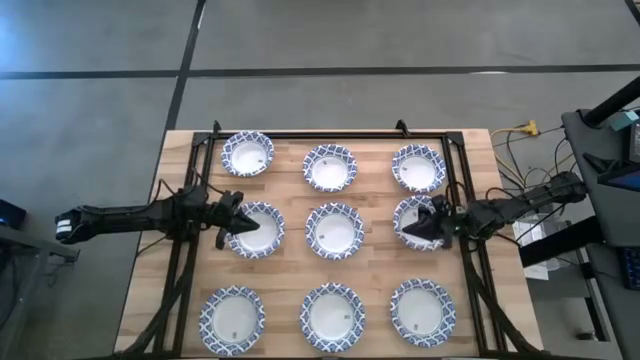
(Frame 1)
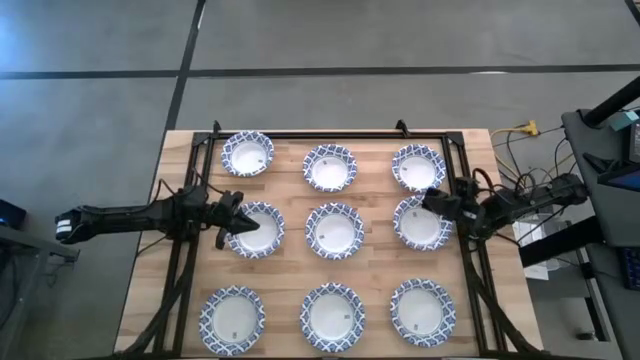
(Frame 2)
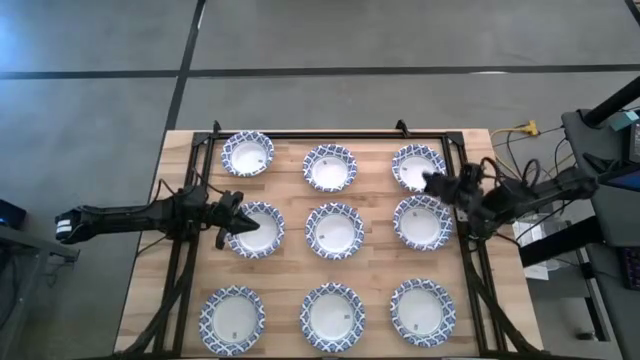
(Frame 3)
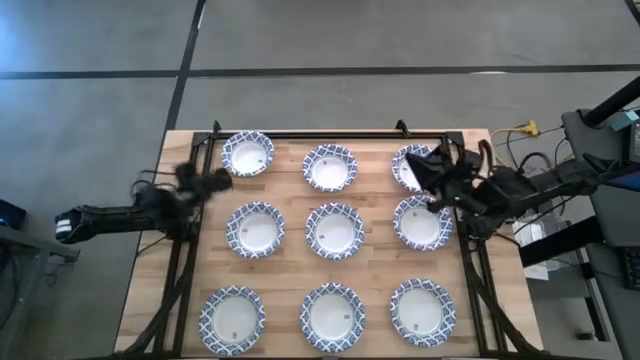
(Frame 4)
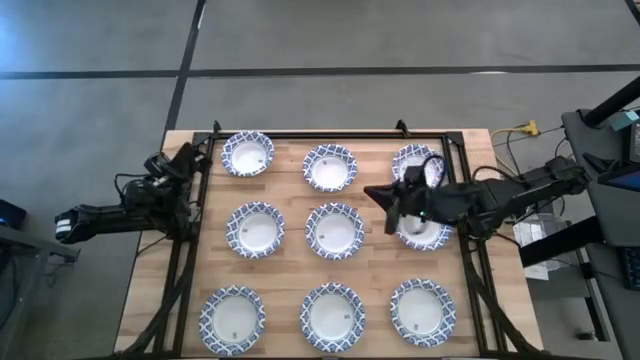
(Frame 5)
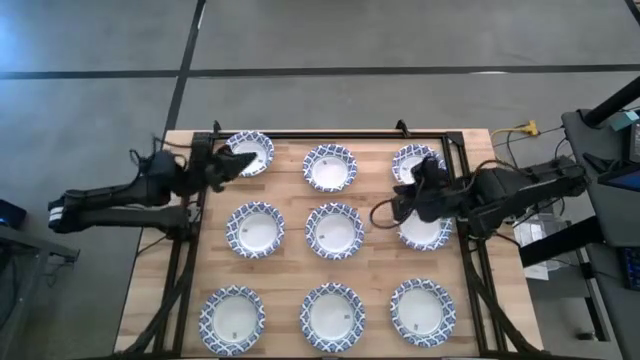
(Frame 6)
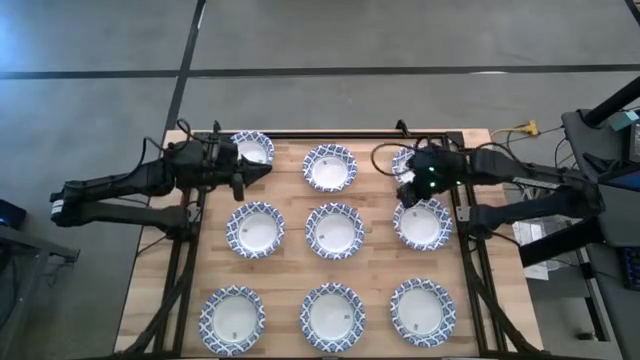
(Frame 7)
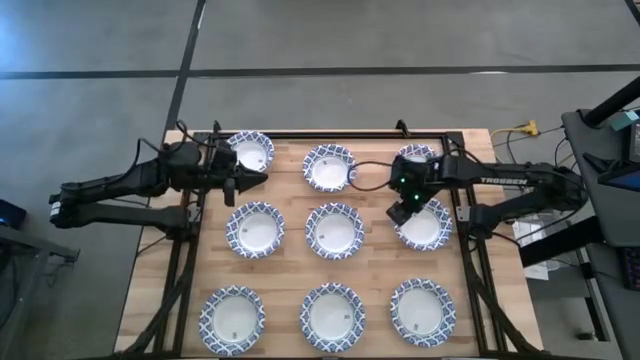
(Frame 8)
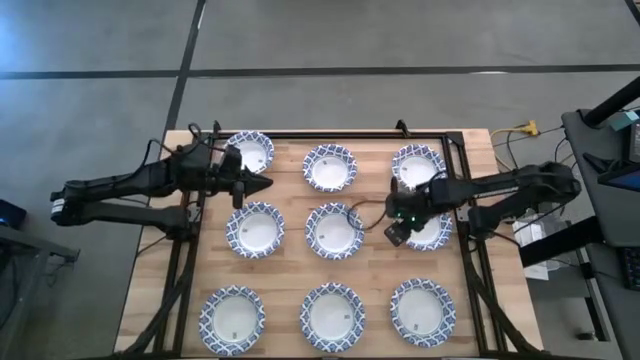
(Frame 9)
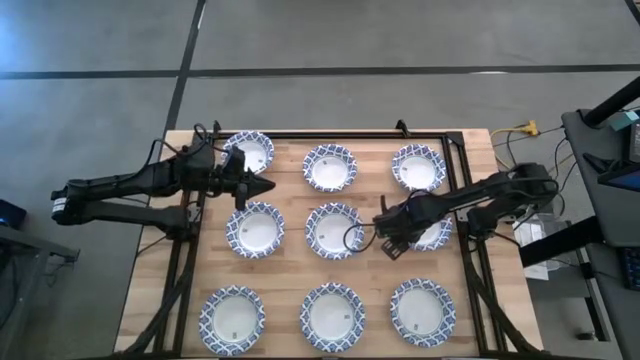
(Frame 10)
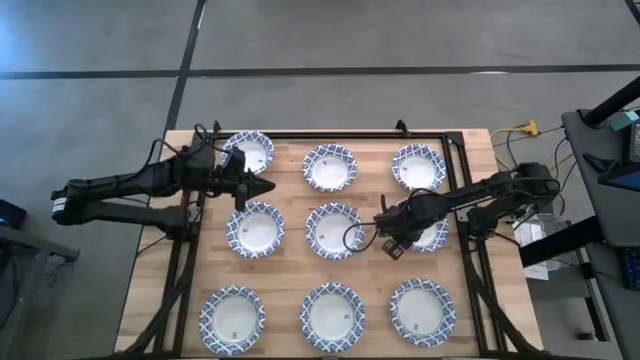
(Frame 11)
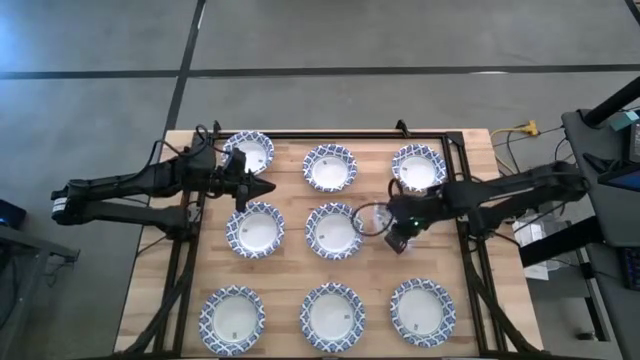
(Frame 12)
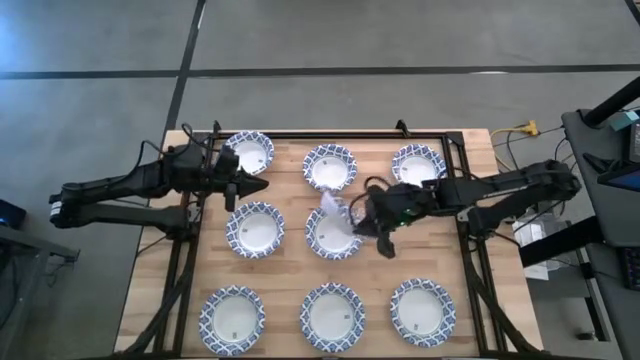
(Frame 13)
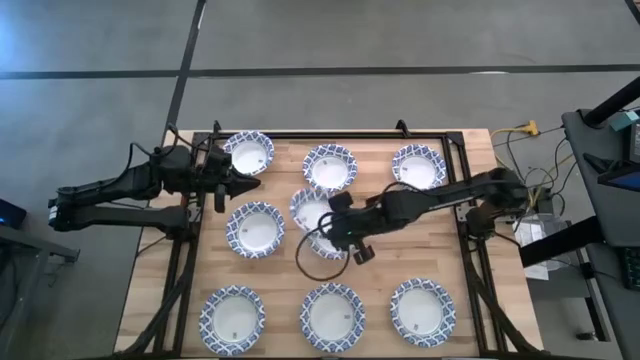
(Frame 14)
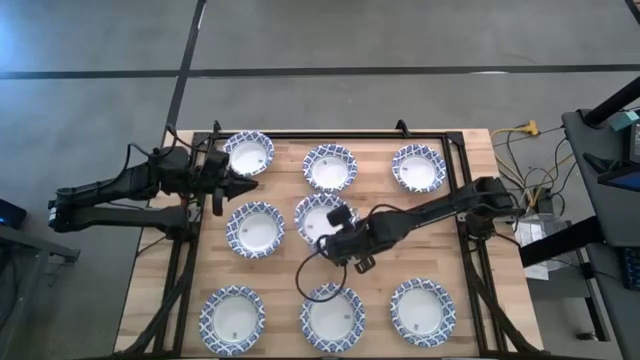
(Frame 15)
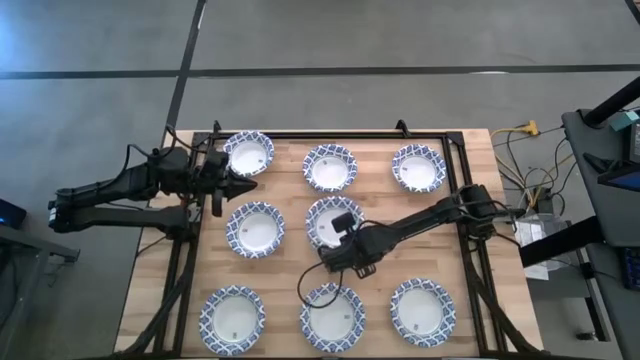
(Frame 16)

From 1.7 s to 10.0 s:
Task: Nest bowls inside each other
Stack the blue paper bowl into the blue paper bowl

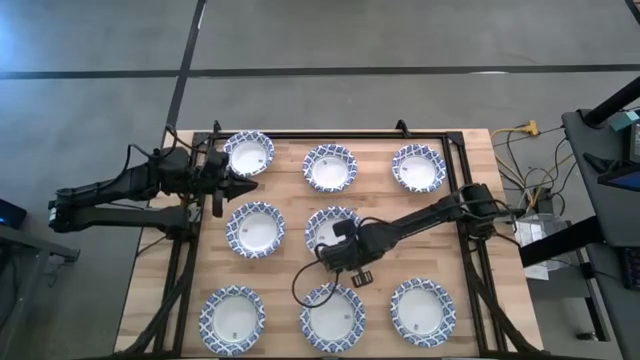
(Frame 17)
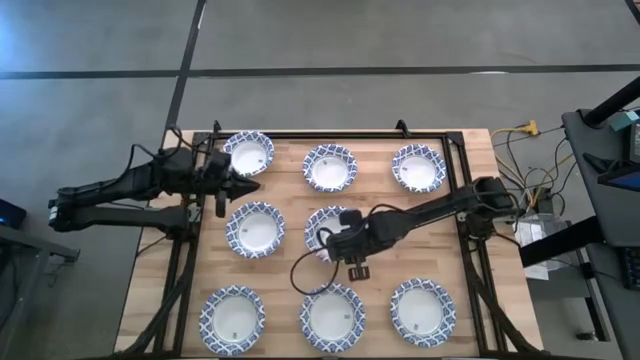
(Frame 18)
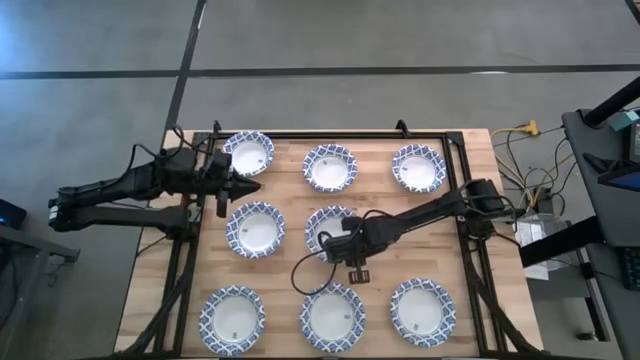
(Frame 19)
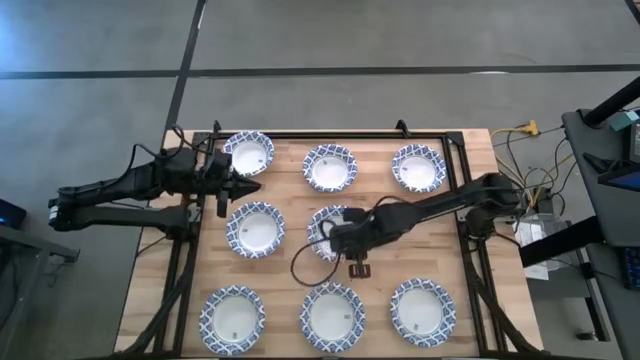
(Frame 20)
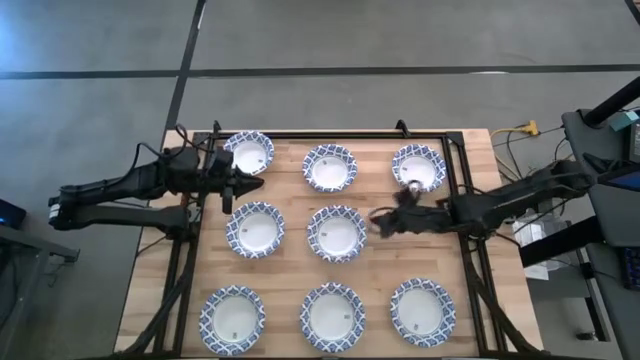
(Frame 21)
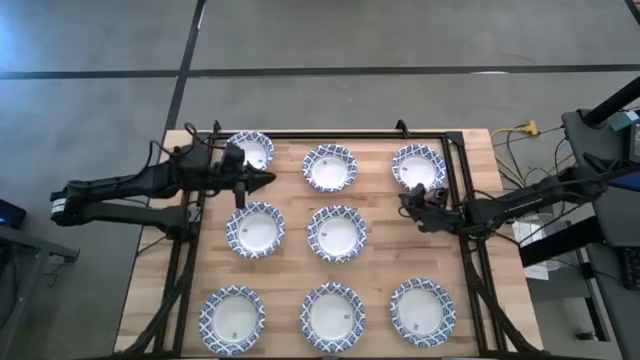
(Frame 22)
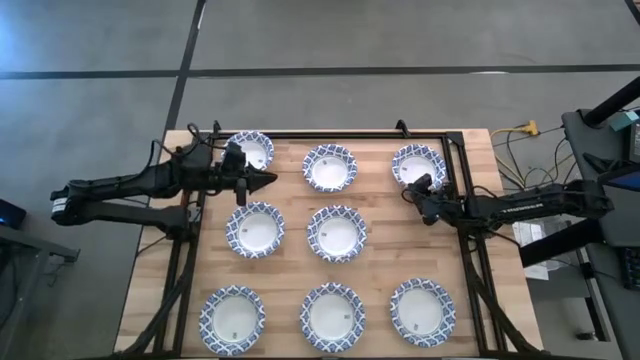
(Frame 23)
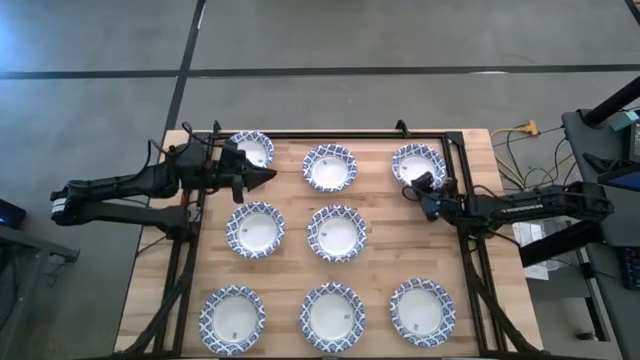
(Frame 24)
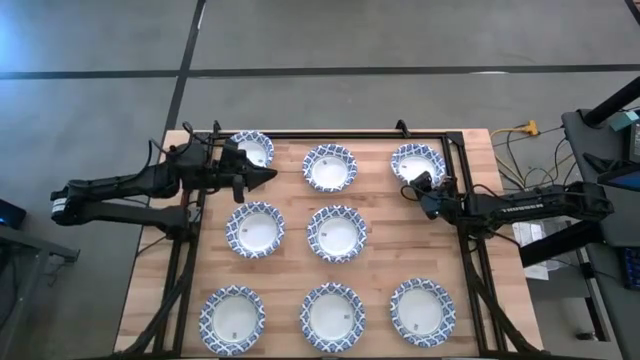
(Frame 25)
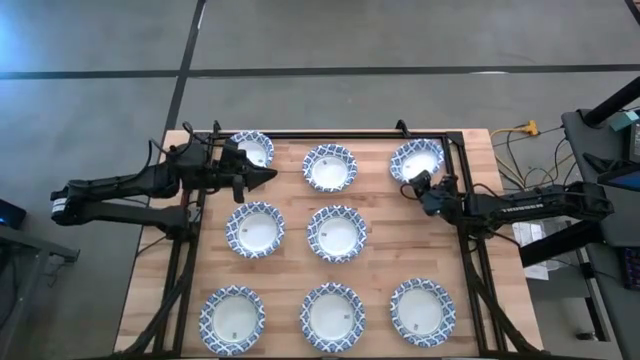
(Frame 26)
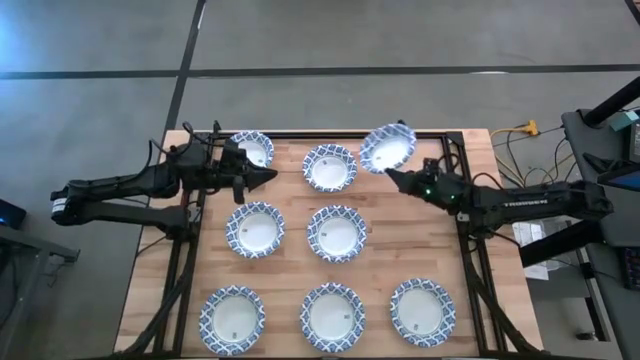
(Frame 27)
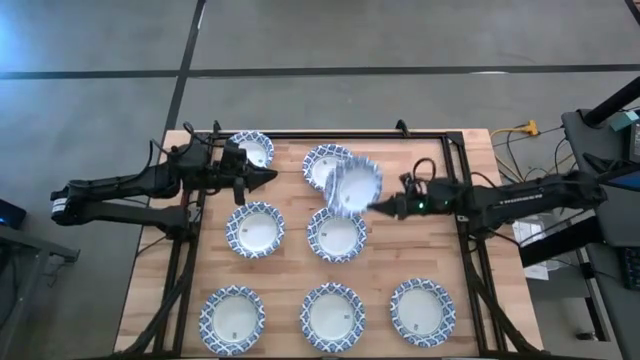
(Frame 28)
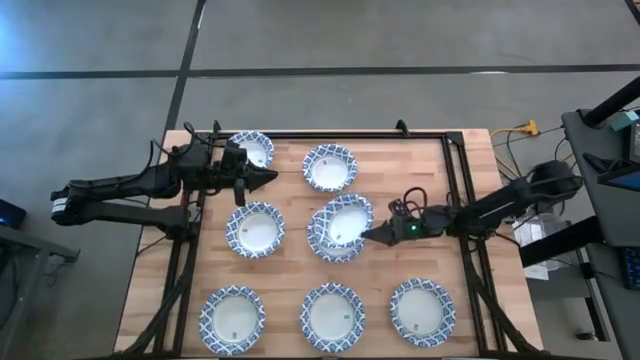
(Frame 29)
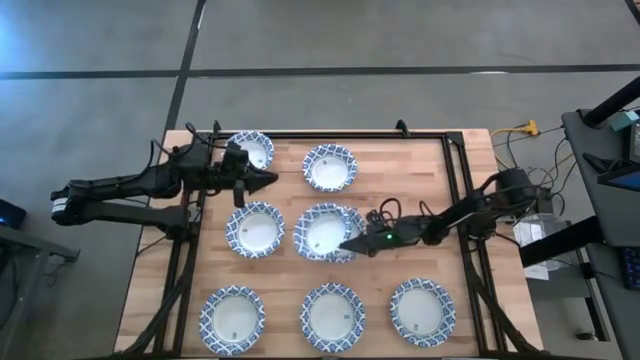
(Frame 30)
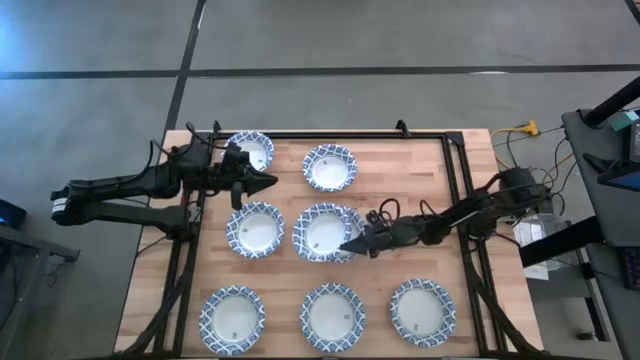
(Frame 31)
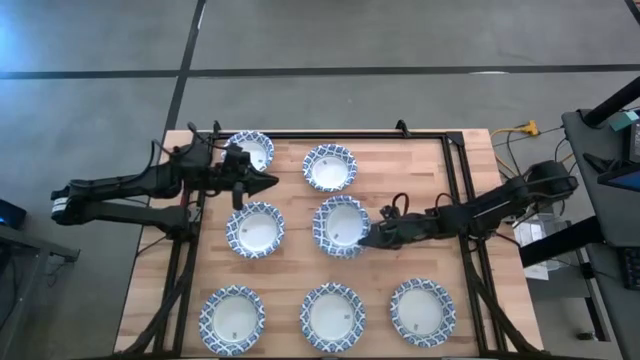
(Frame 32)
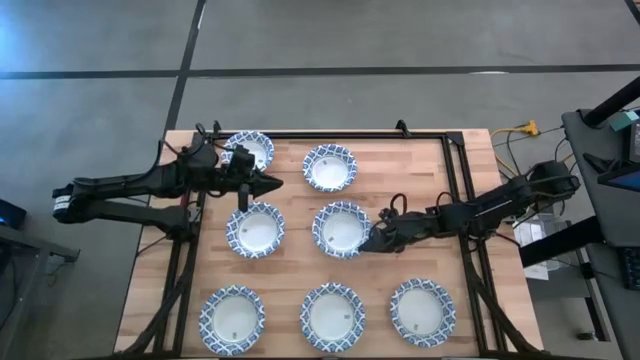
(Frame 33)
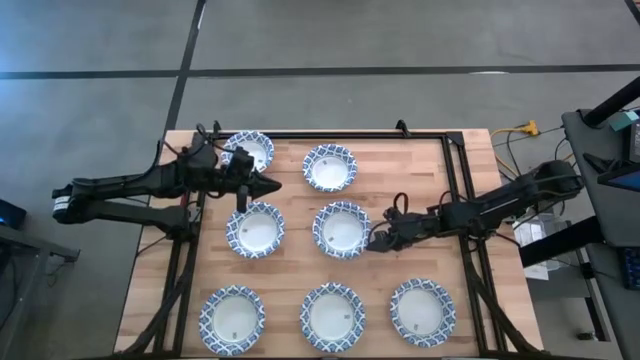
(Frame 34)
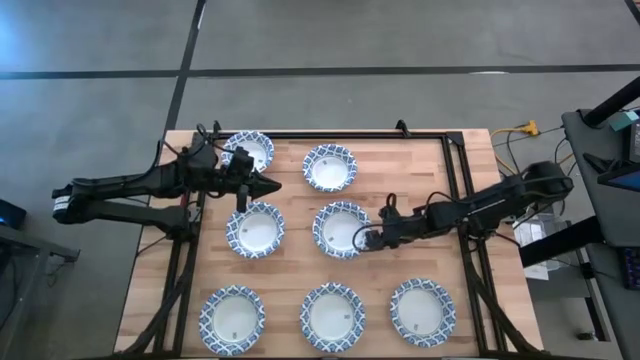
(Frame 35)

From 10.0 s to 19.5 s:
Stack the blue paper bowl into the blue paper bowl

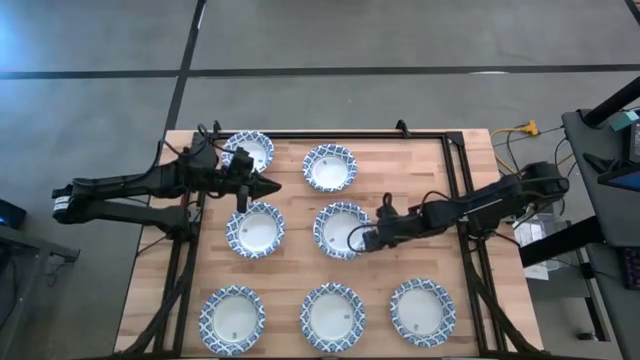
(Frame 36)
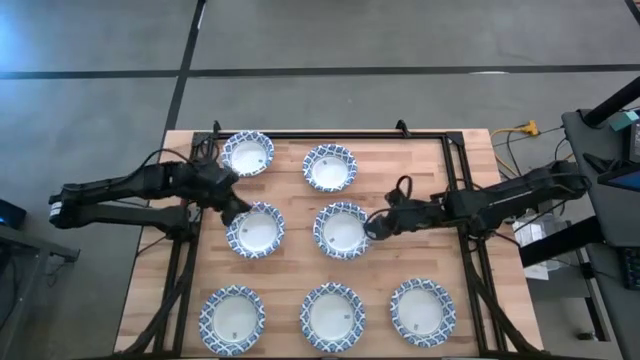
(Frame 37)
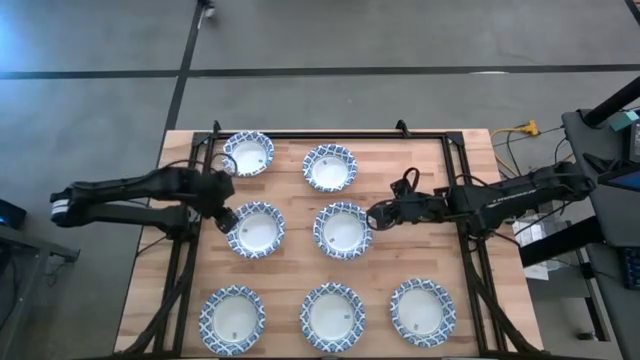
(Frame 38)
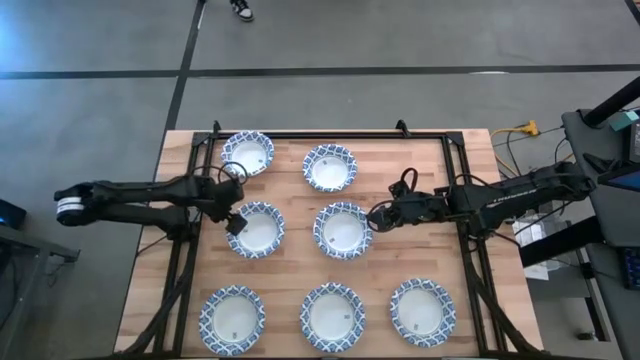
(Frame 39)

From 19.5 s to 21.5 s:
Stack the blue paper bowl into the blue paper bowl

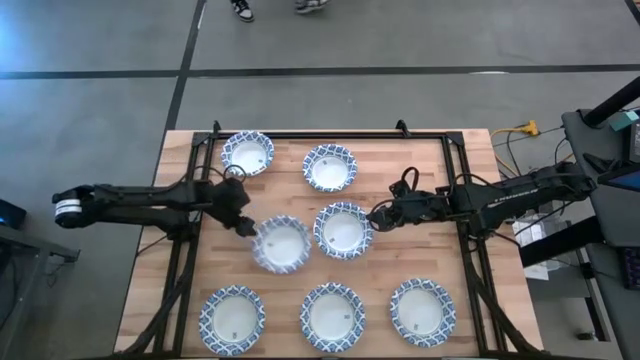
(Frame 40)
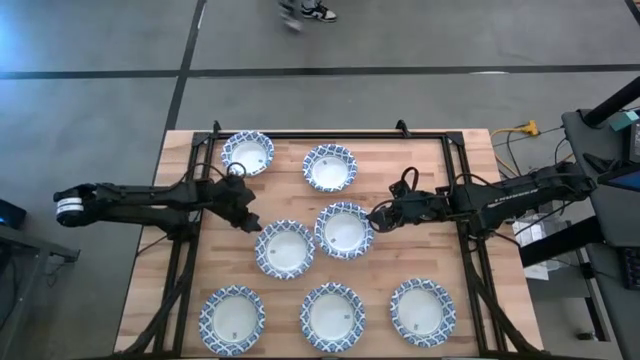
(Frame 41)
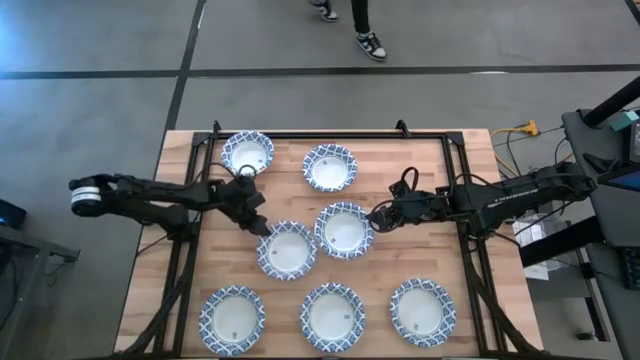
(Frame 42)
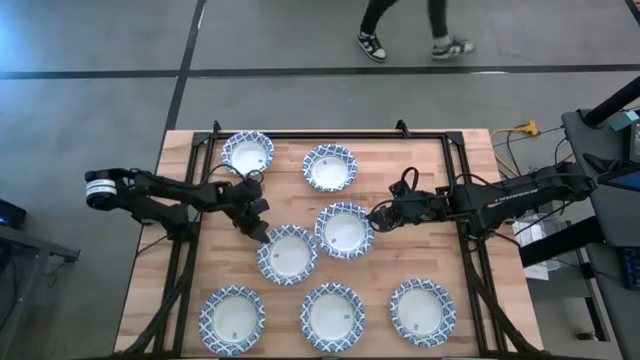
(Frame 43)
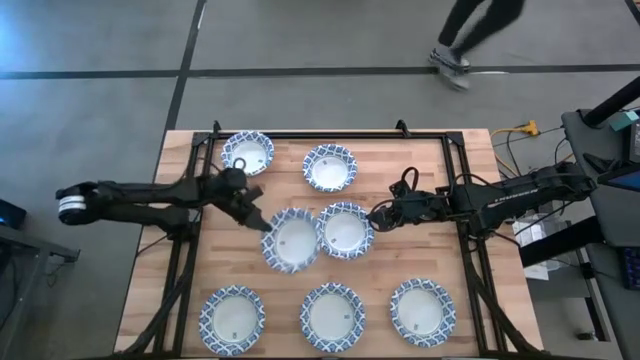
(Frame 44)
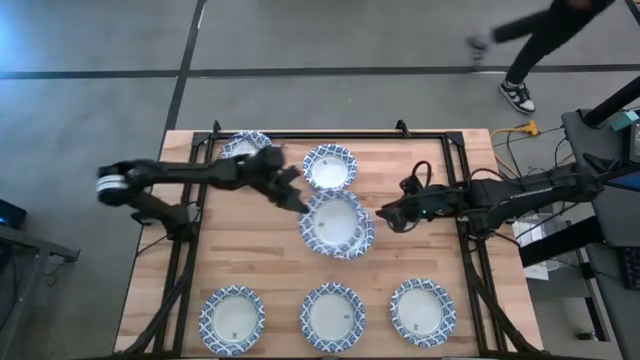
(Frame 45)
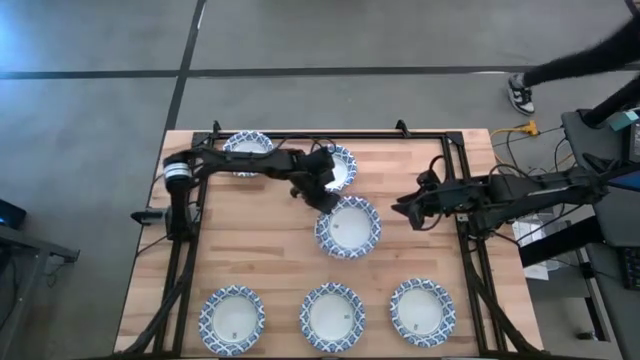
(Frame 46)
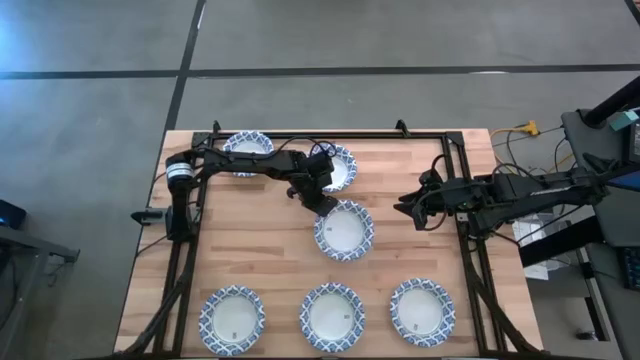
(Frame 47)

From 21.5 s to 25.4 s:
Stack the blue paper bowl into the center blue paper bowl
